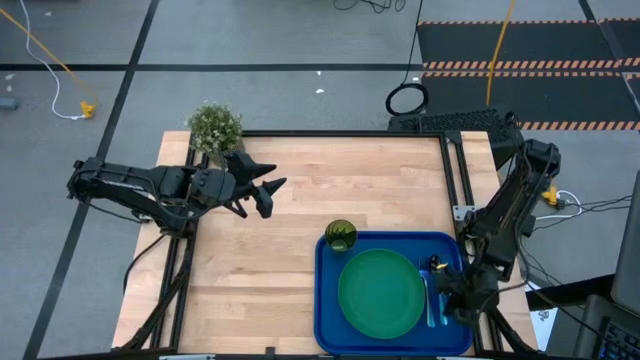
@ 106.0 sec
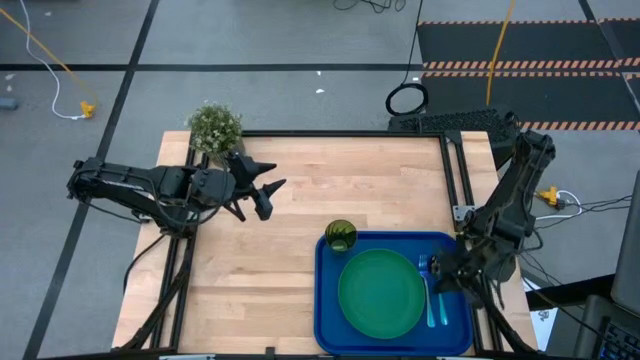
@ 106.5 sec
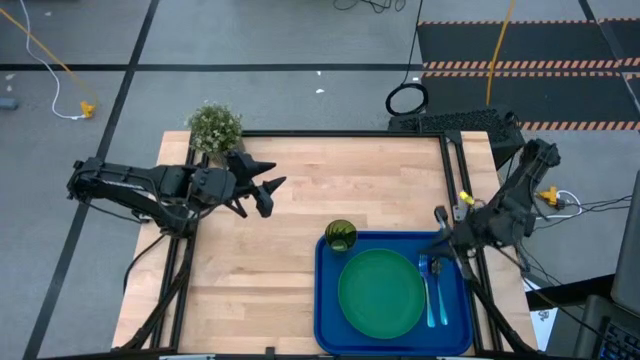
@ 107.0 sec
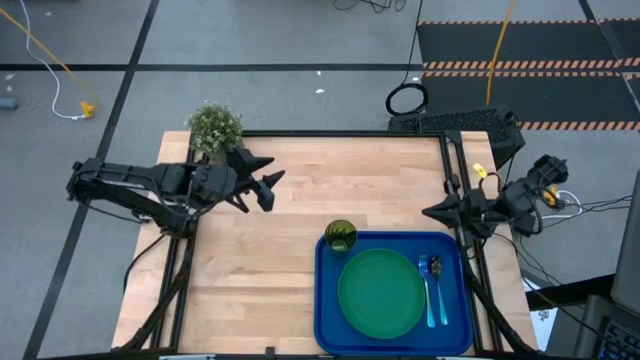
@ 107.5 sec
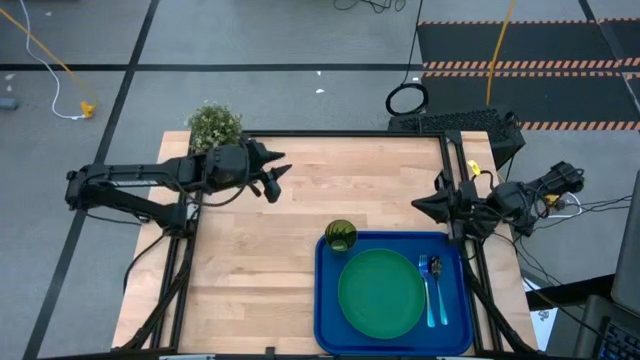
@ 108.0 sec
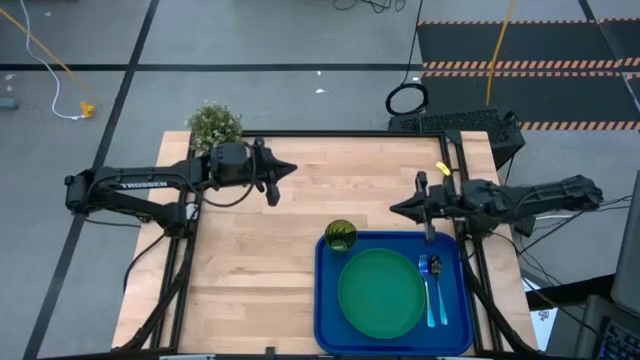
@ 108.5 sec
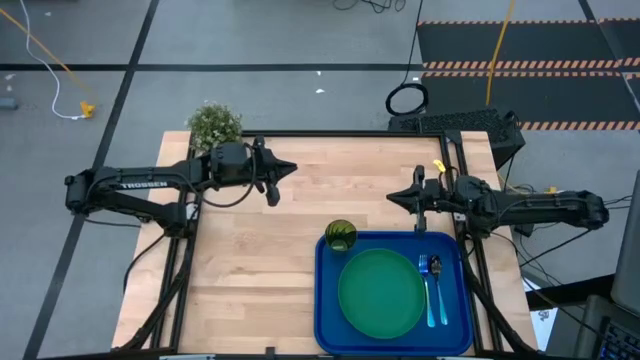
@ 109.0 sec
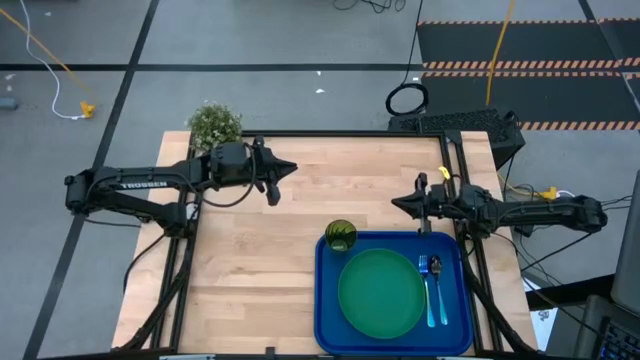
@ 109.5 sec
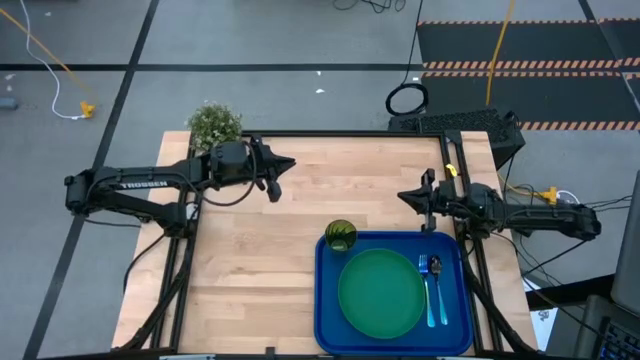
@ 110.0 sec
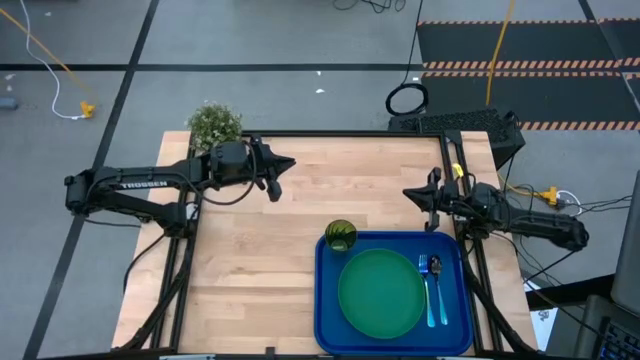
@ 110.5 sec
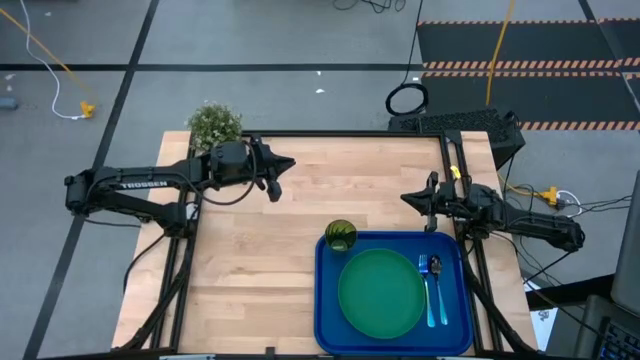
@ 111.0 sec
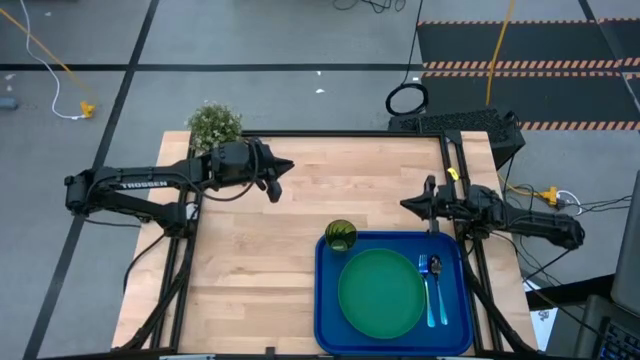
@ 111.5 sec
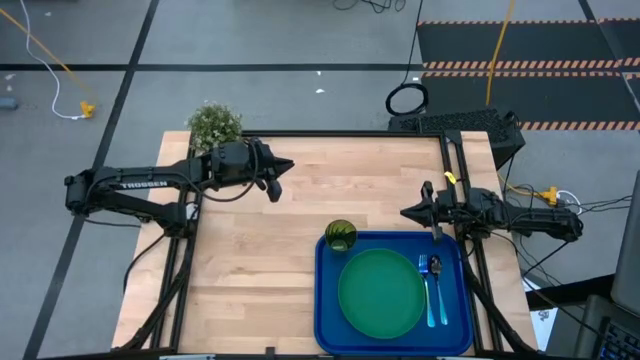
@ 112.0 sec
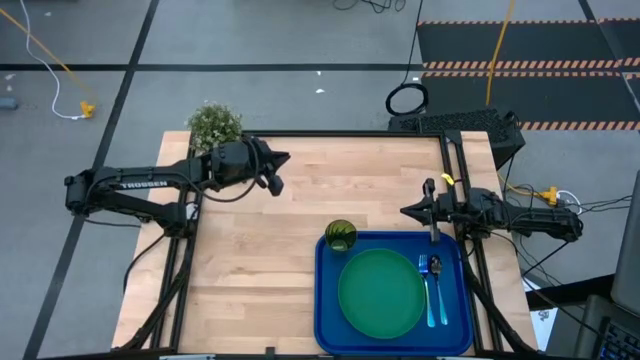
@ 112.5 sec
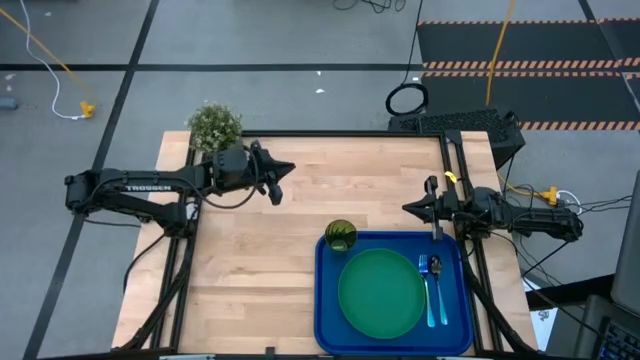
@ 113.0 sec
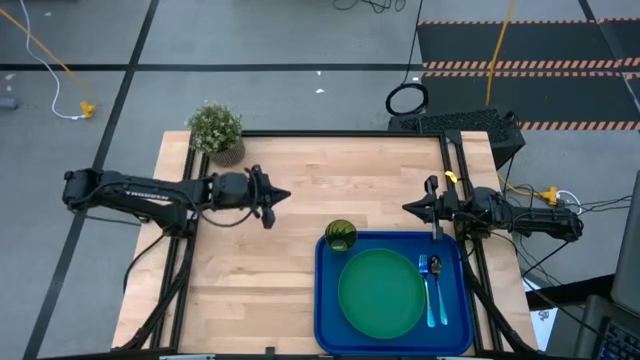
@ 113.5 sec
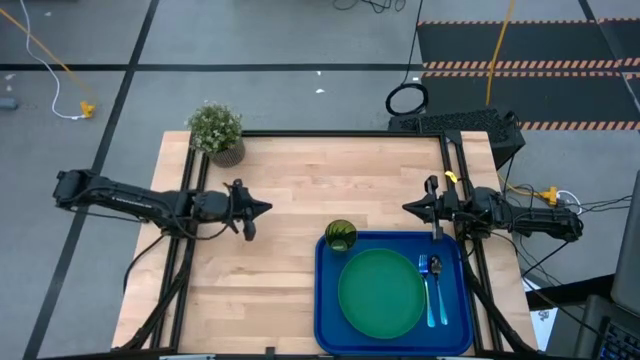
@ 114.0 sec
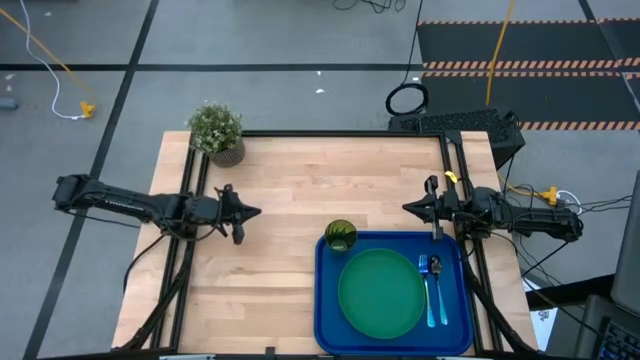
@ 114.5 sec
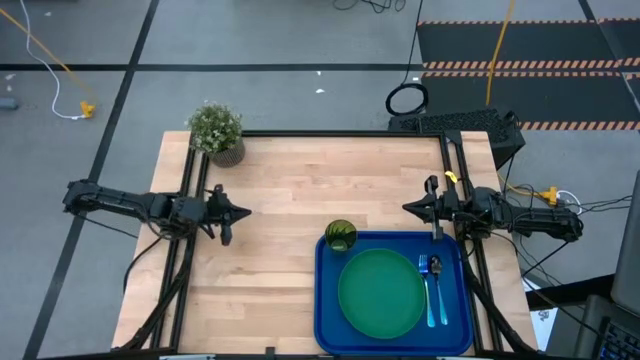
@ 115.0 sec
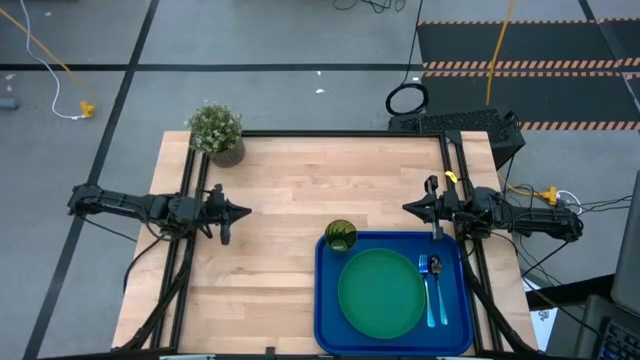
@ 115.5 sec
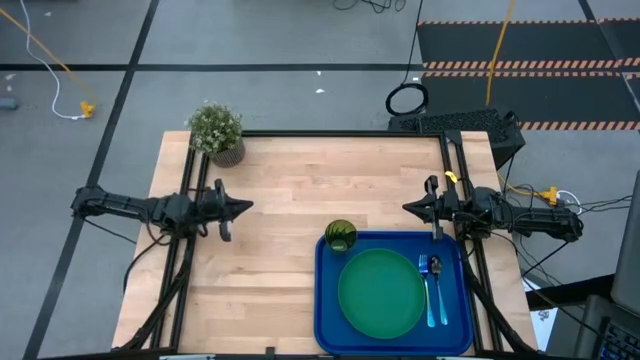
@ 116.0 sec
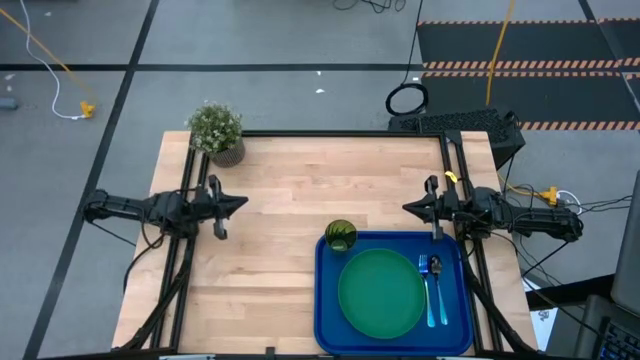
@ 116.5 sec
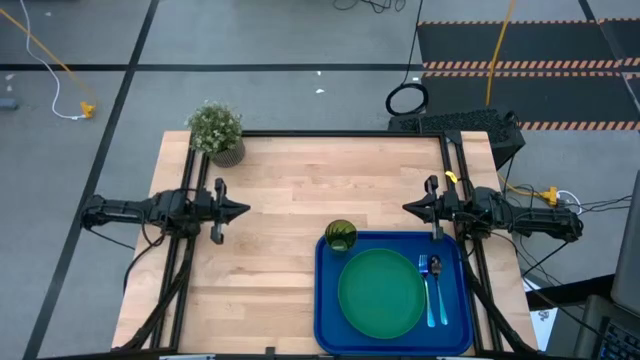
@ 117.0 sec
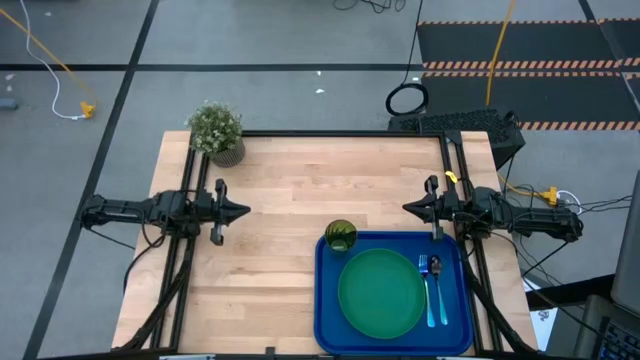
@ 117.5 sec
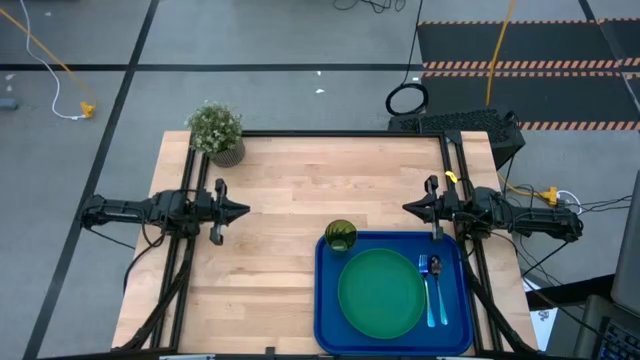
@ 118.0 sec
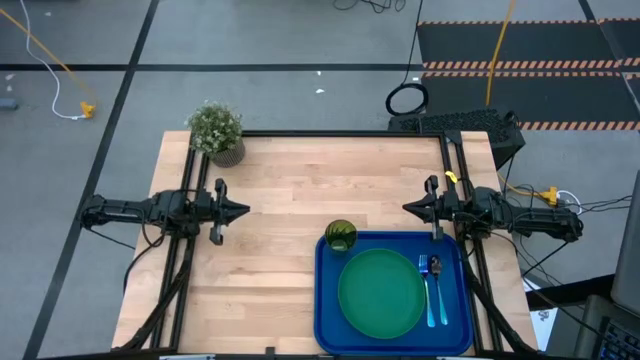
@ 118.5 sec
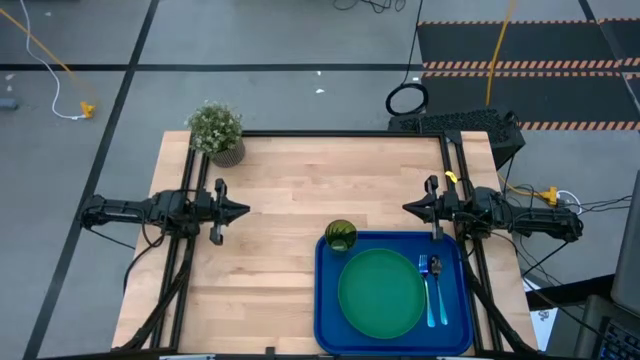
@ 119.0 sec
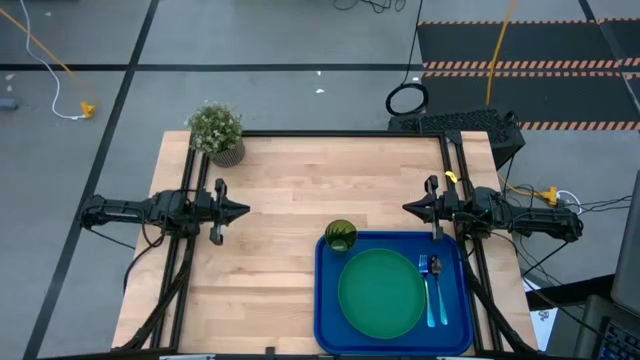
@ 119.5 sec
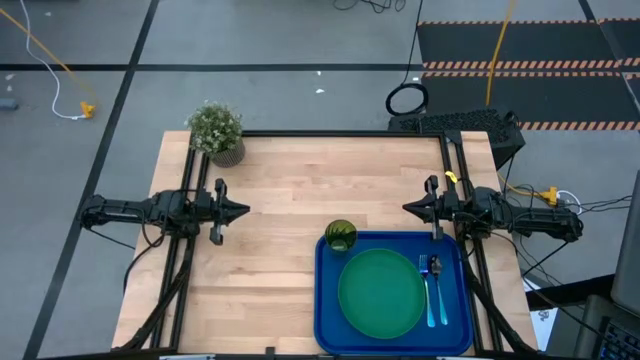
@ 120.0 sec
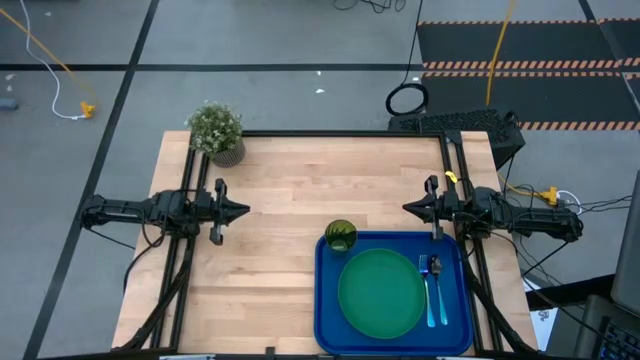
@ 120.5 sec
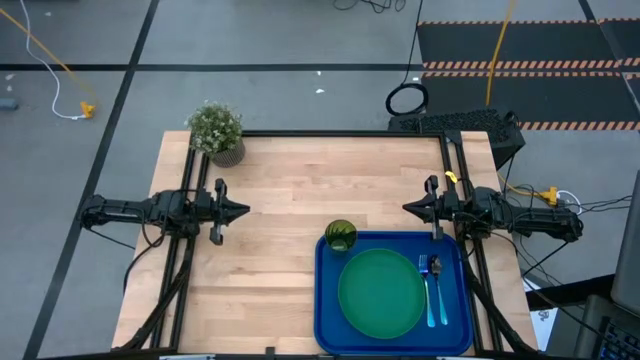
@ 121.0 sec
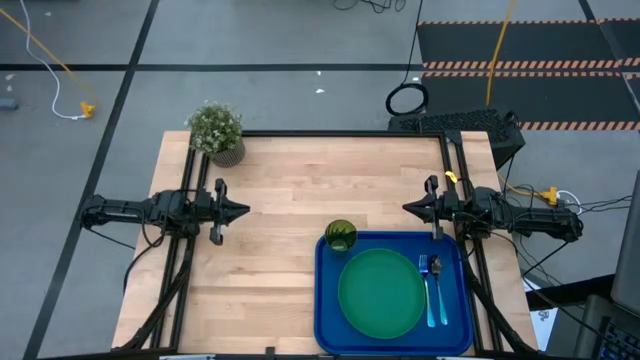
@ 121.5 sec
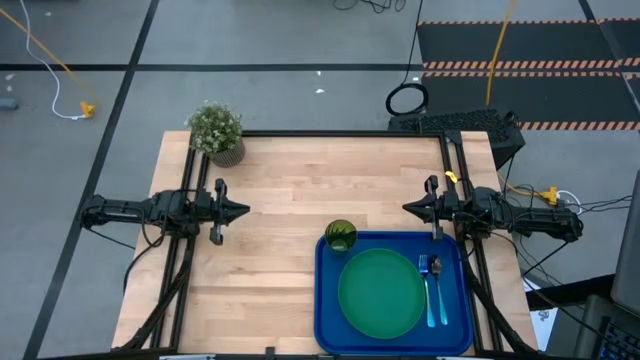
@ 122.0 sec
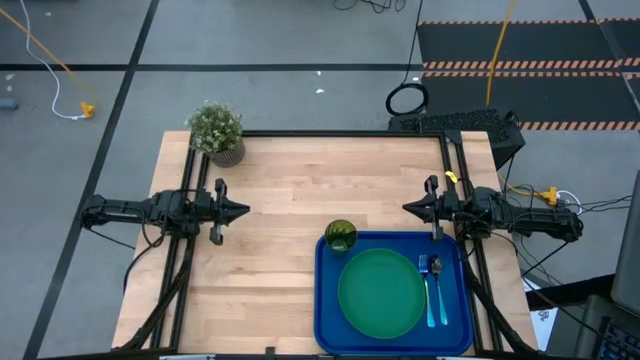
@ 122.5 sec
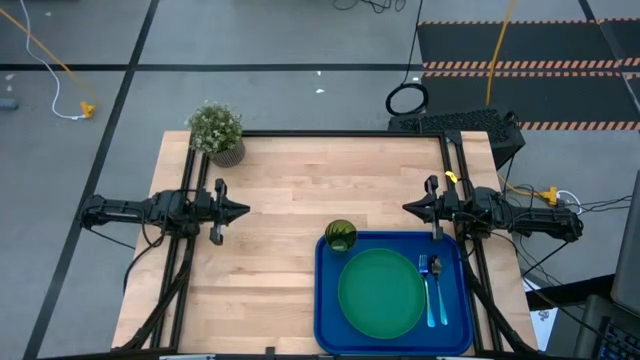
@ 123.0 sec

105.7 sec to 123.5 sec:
Task: Pick and place plate/cup/fork/spoon on tray
Return to Home Position

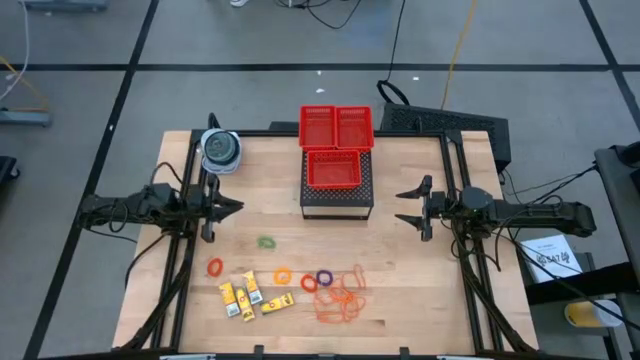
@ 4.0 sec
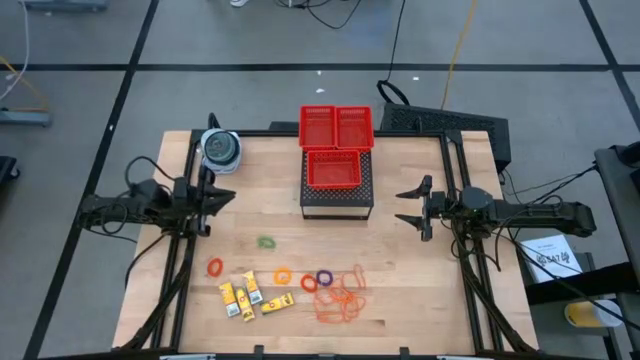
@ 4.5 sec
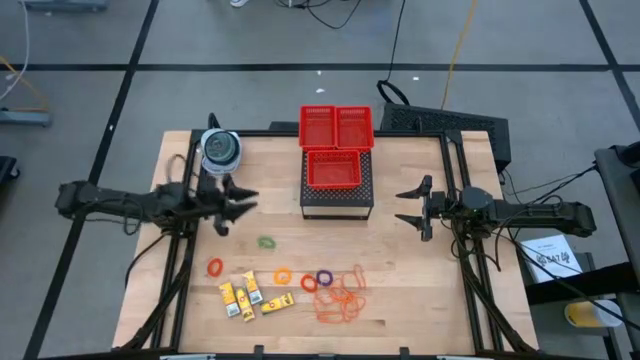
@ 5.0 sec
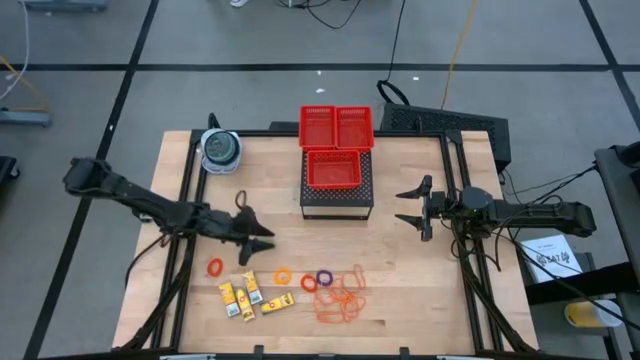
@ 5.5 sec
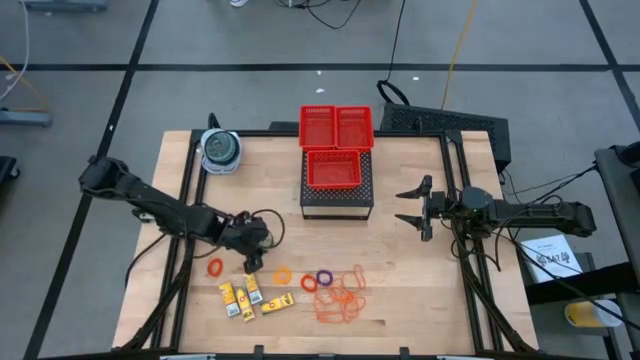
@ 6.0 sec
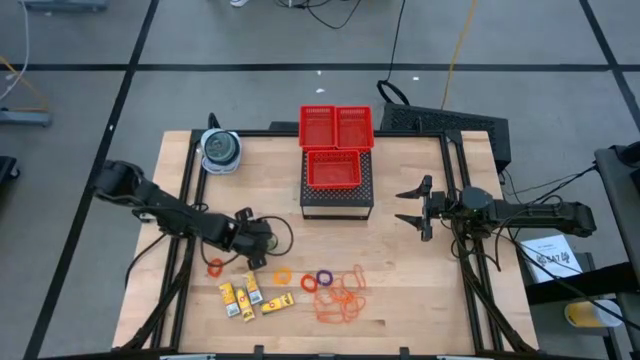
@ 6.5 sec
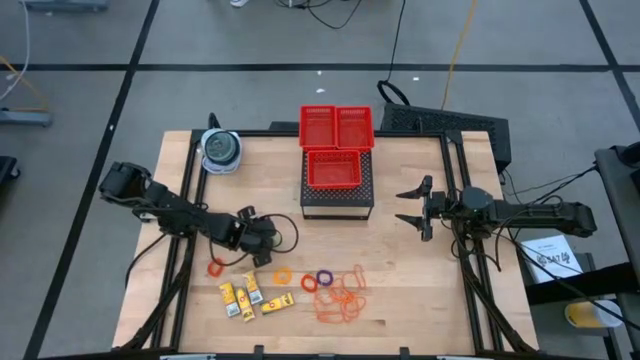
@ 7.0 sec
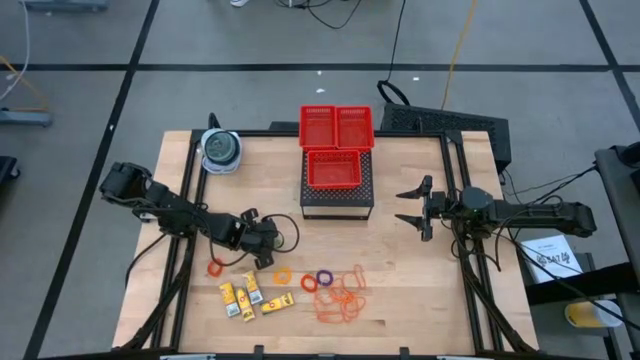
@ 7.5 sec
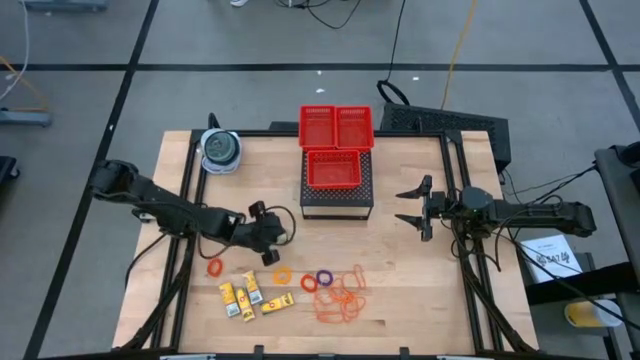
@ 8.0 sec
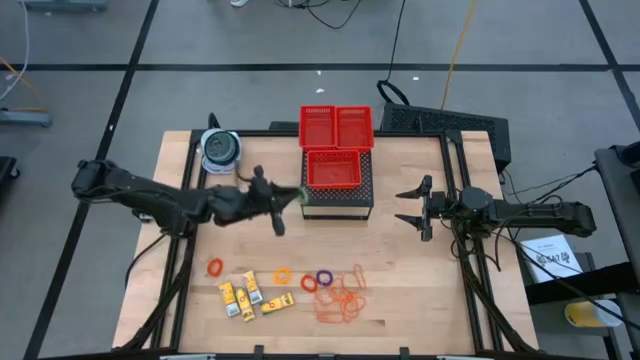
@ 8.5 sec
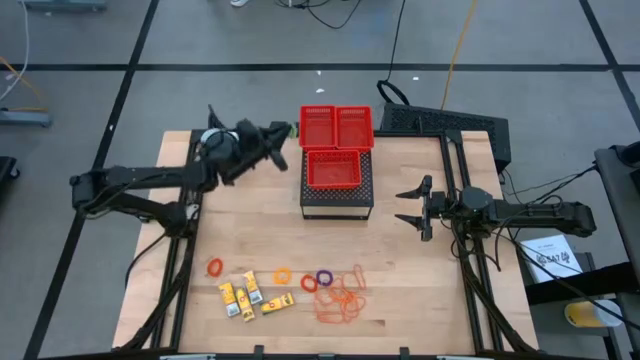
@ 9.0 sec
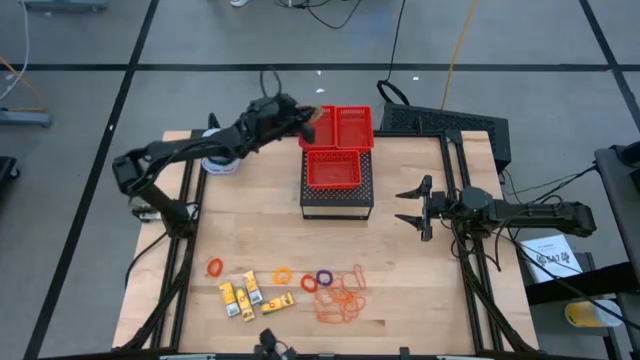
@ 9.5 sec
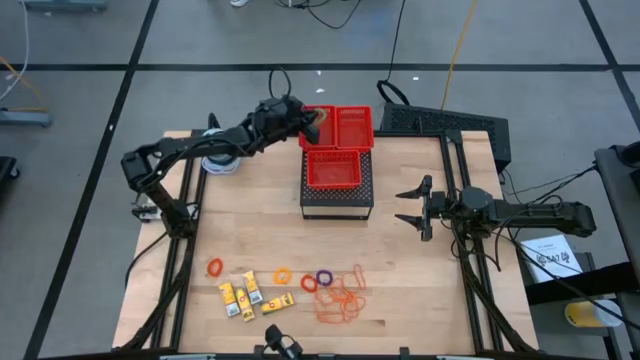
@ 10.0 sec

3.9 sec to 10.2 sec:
Task: Pick & Place Office Desk Supplies
Put the green spring keychain in the top left red bin on the shelf
